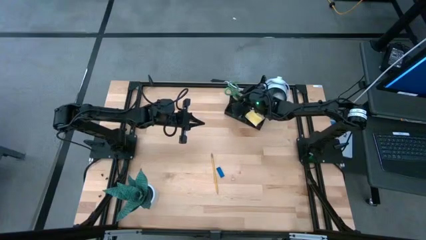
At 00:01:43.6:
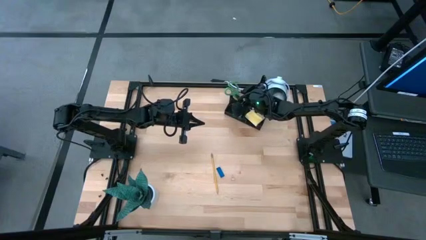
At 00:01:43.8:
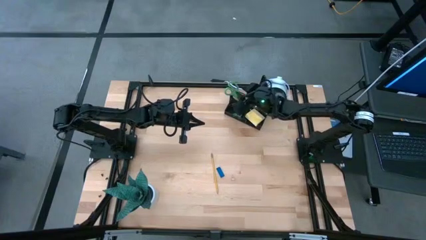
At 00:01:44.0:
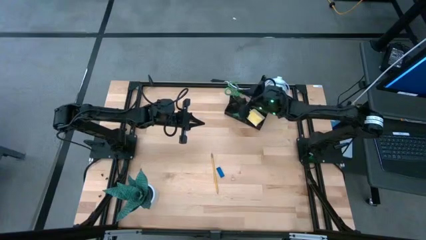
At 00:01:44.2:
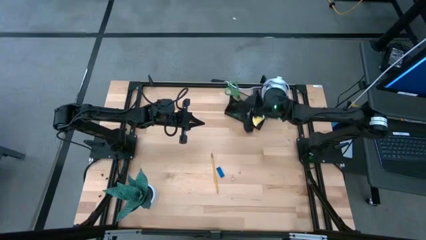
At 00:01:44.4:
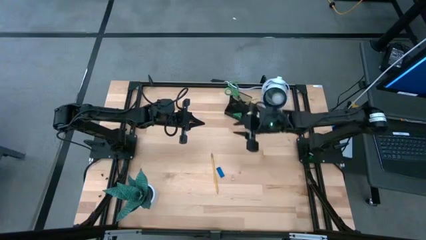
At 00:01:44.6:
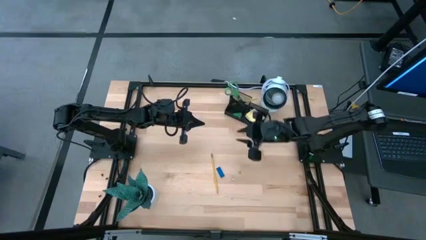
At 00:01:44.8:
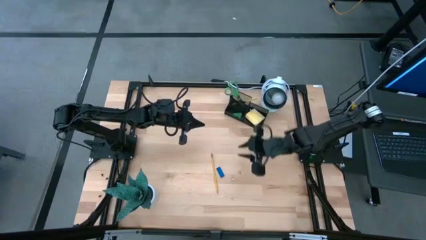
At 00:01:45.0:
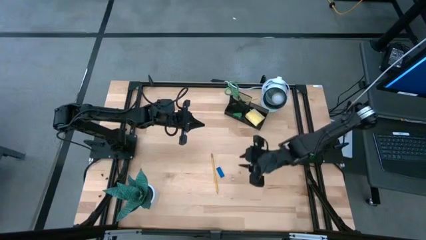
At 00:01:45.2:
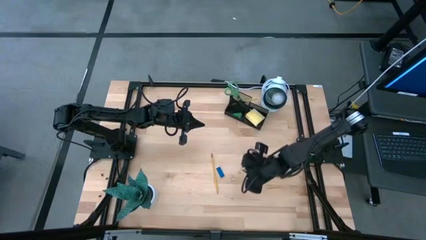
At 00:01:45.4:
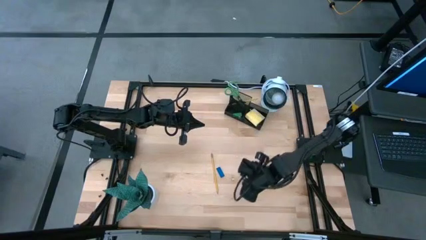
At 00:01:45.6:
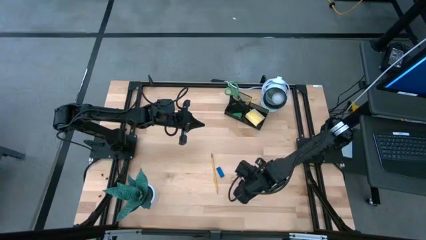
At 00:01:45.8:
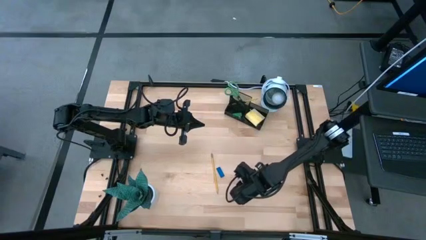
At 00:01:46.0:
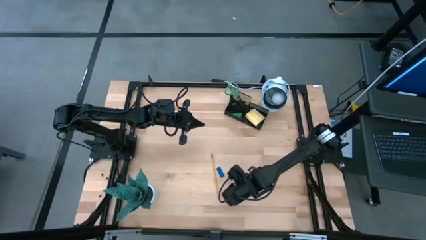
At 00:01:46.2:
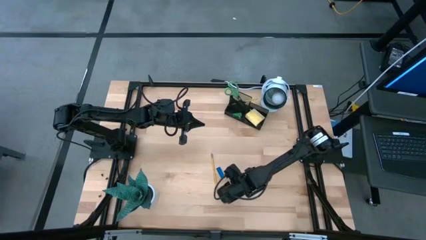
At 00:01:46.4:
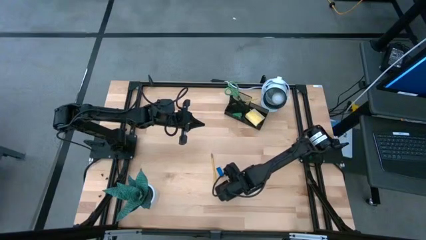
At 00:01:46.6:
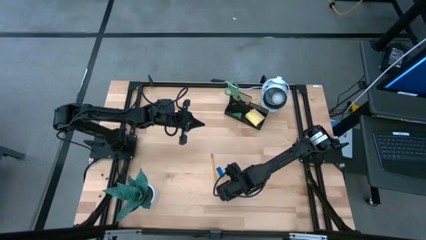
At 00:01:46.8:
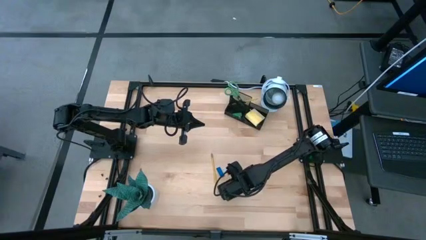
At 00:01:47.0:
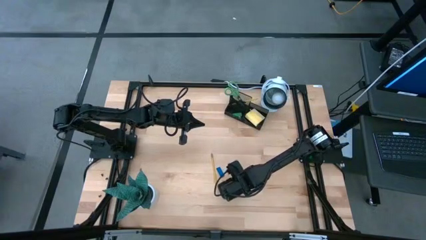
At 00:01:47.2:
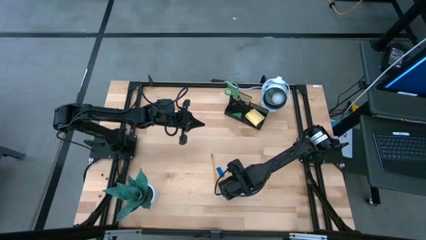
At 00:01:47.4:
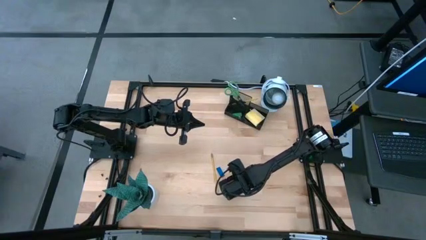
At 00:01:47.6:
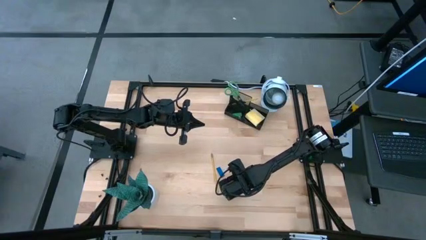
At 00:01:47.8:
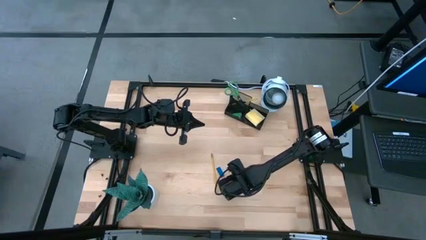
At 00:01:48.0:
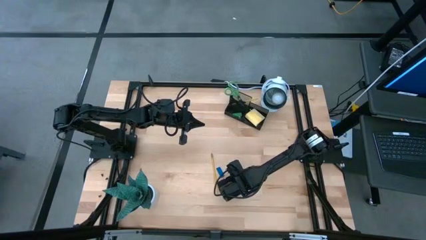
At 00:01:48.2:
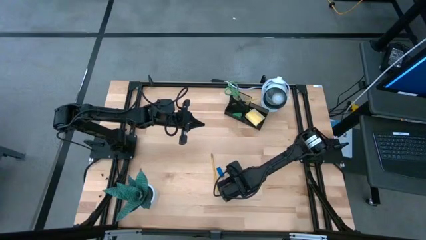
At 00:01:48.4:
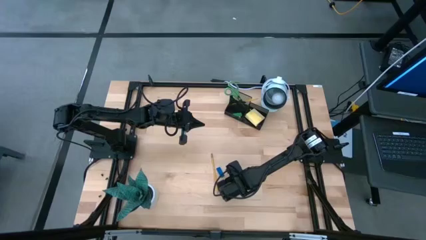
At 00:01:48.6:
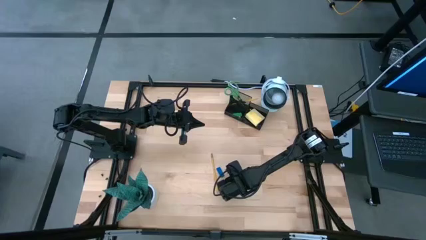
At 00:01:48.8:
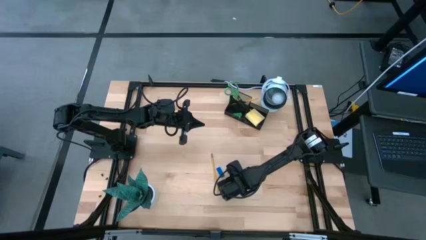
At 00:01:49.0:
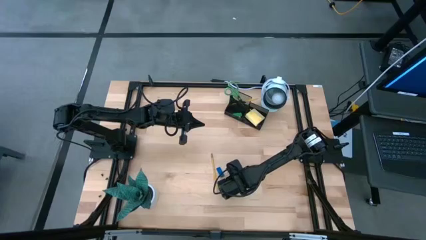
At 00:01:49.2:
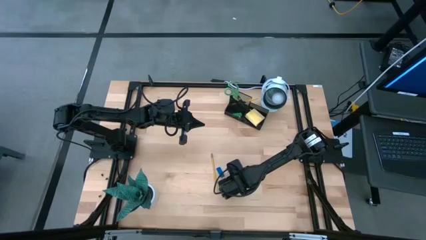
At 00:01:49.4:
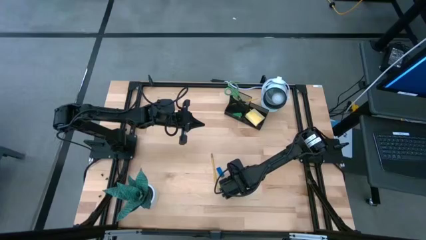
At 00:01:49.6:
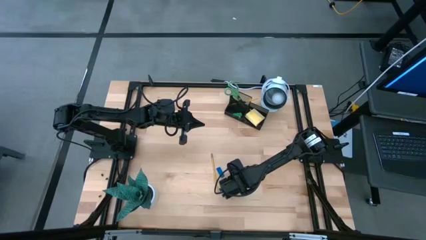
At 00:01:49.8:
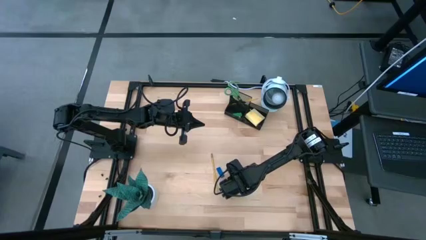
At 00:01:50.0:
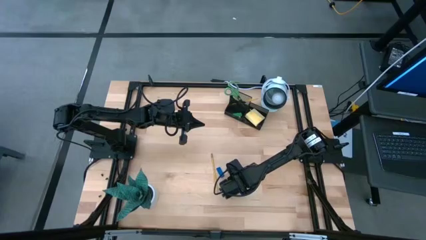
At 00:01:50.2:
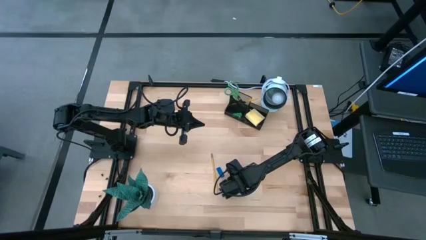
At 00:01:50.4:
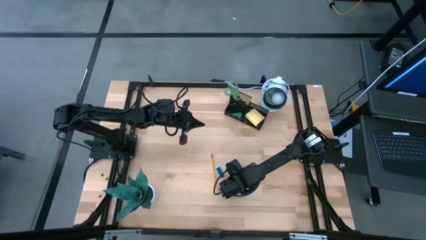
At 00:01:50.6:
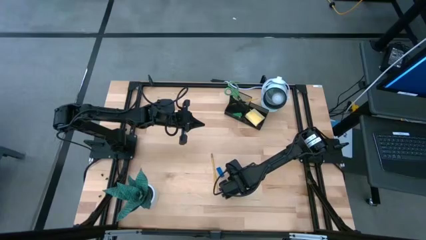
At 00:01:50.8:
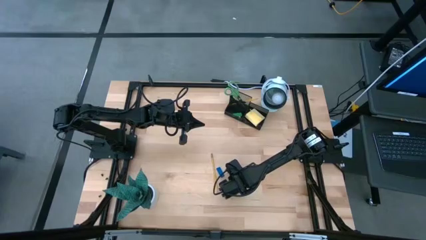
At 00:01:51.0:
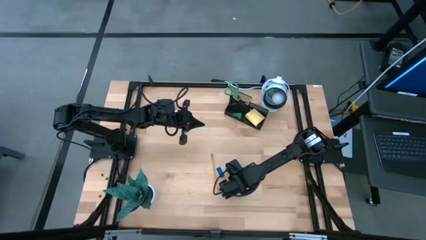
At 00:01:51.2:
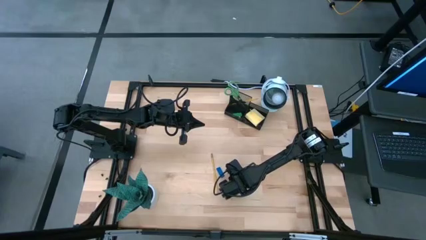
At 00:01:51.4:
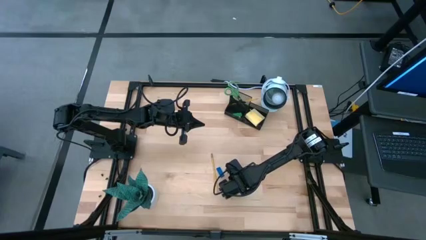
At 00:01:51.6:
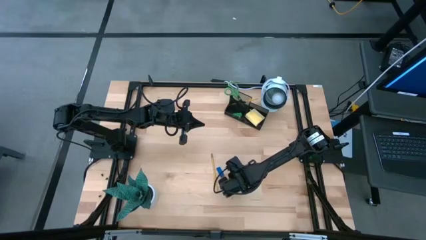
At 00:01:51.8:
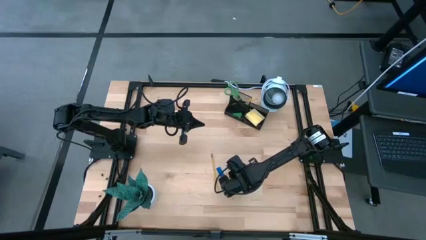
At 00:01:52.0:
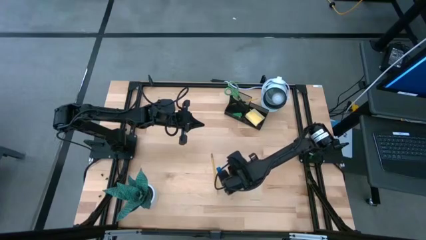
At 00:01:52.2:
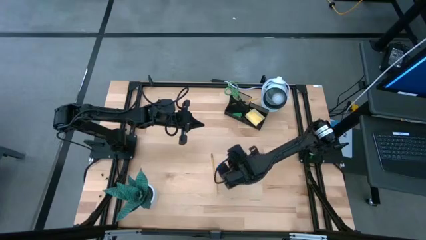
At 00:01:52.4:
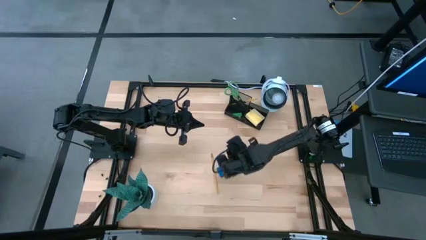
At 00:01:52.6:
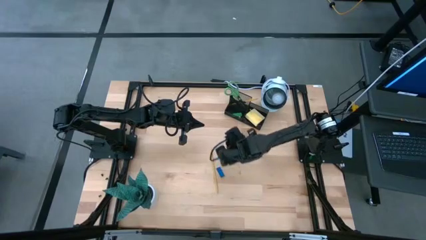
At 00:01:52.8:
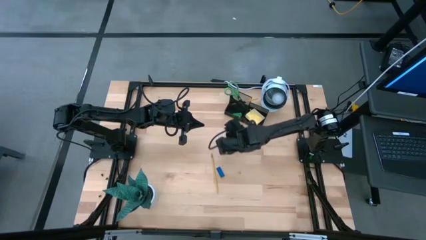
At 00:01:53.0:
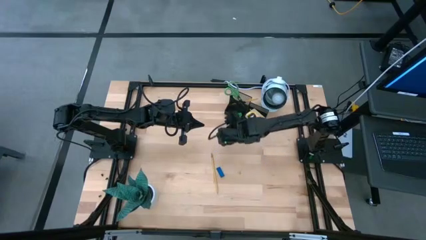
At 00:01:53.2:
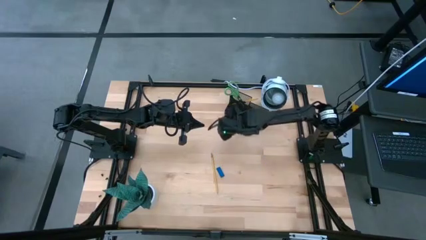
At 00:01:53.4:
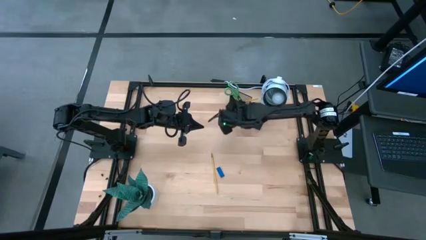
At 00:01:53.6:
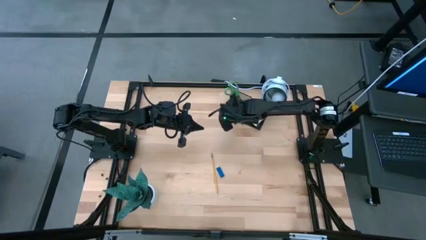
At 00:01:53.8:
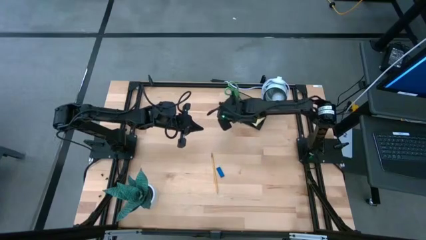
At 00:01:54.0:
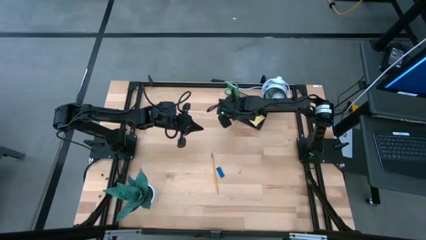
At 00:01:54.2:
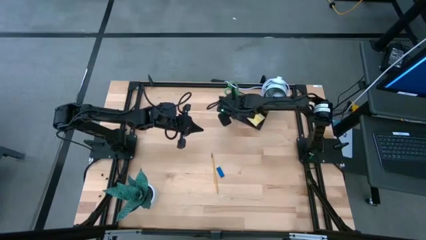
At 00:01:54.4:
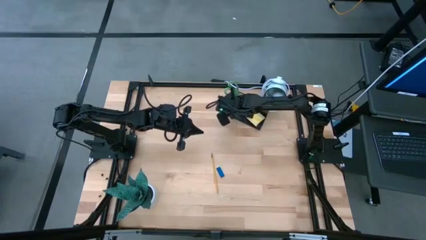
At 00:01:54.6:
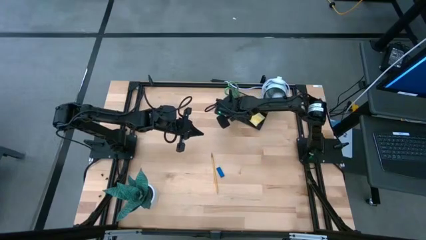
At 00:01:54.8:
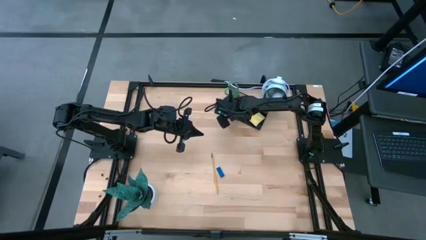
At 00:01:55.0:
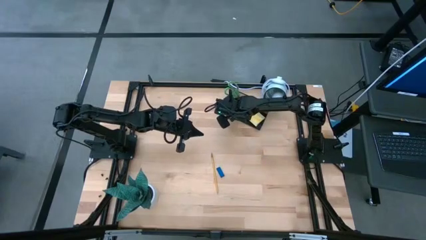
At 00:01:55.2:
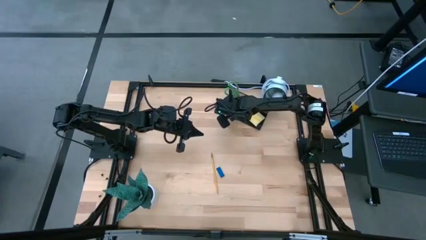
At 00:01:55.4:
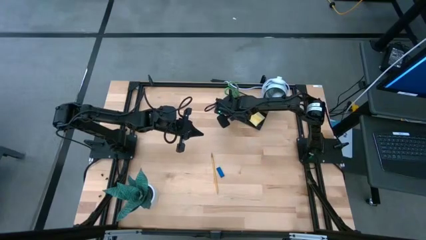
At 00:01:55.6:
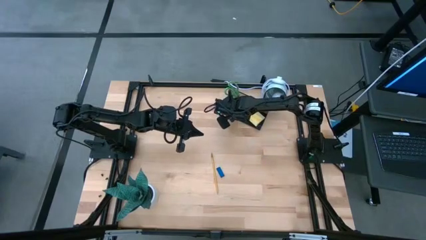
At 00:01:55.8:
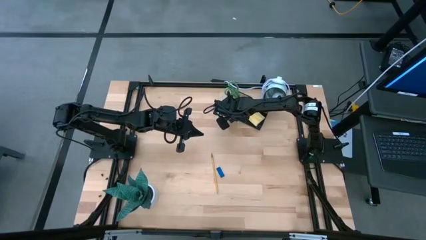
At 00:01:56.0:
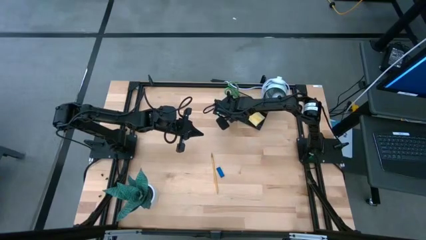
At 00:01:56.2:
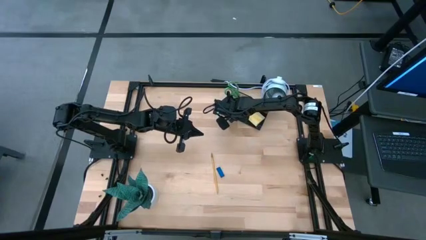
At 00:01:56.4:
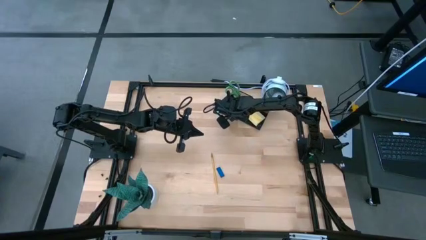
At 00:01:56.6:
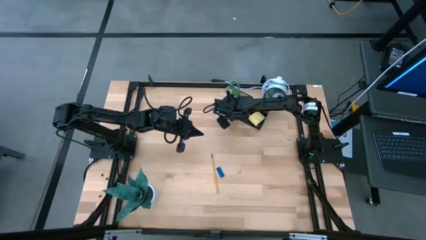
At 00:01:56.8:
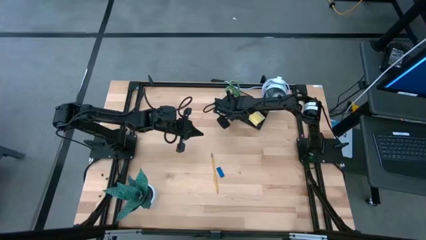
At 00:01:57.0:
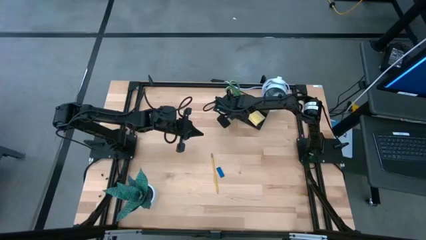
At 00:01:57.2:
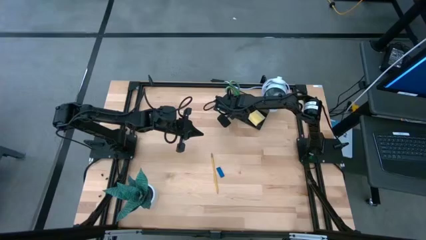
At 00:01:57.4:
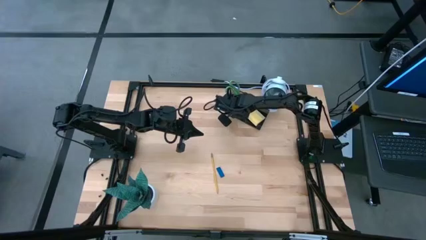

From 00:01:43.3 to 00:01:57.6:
Task: Pick and place office supplies into organizer
Put the binder clip into the metal mesh desk organizer

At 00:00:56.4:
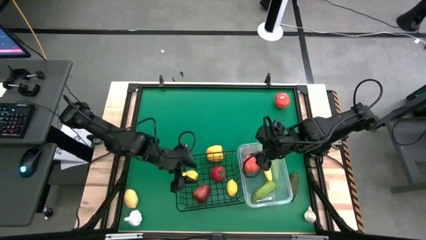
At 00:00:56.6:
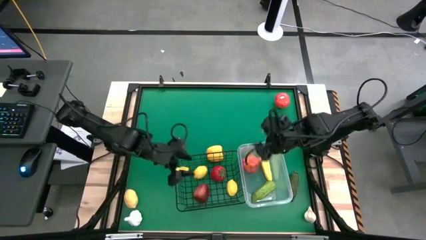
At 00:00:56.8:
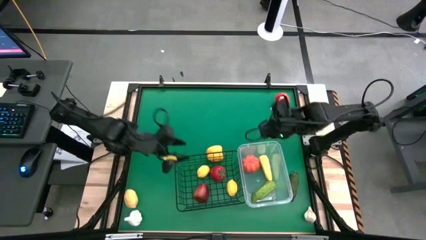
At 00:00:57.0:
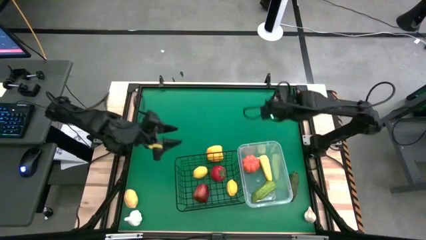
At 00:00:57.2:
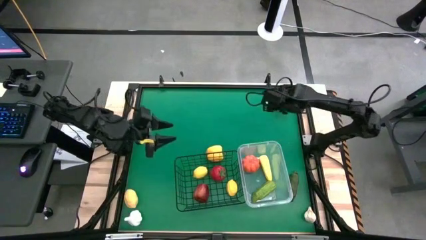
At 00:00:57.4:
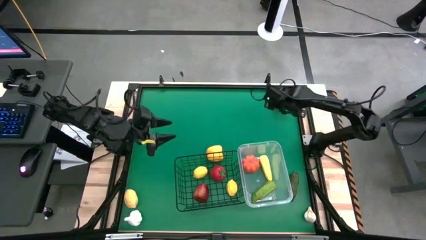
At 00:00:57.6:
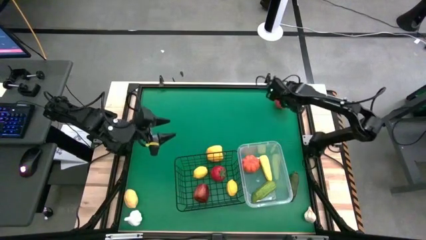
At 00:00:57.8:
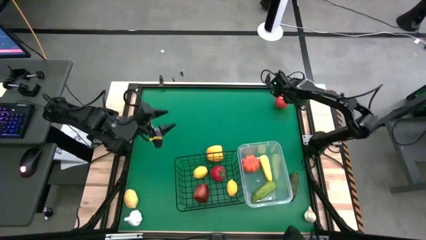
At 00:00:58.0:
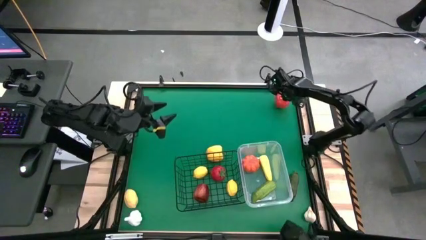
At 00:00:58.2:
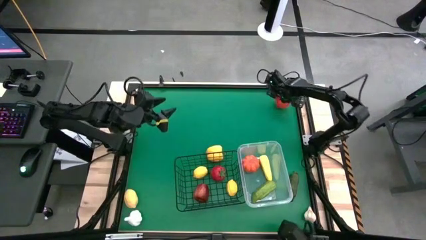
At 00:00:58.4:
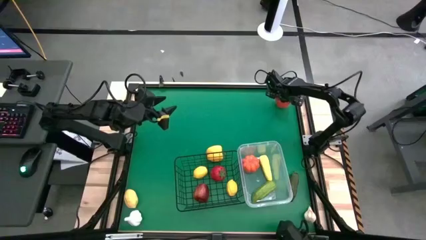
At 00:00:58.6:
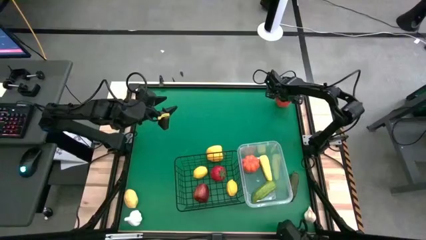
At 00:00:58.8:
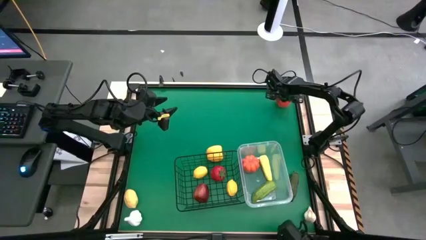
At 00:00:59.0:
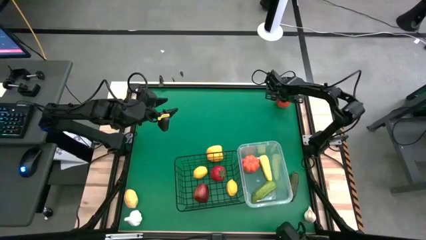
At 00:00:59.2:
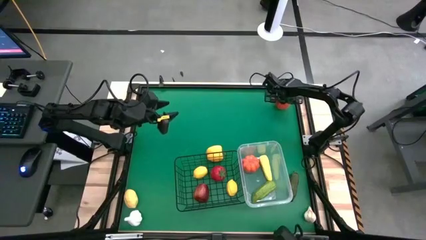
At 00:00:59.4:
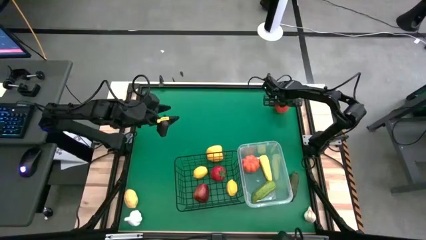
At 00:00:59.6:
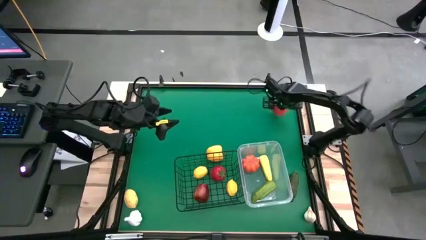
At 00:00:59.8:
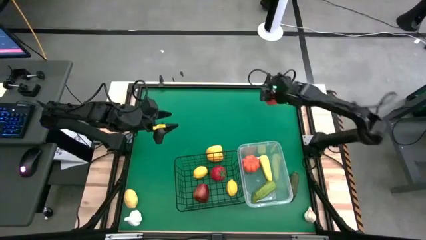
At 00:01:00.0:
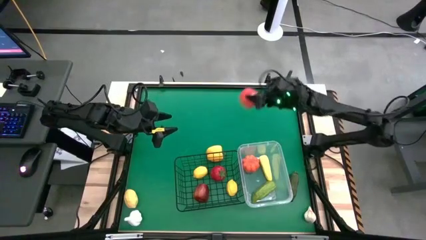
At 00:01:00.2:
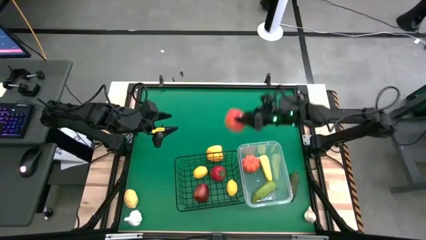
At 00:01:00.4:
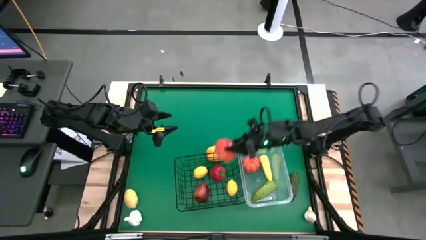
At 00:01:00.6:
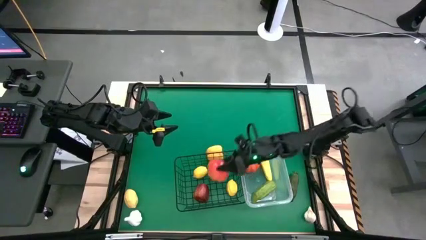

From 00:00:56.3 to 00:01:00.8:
Task: Sort produce into baskets
Put the tomato into the wire basket
